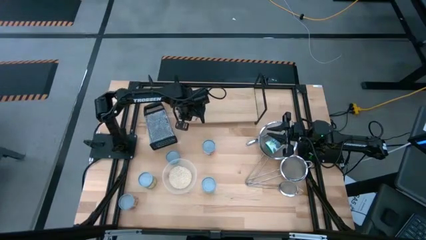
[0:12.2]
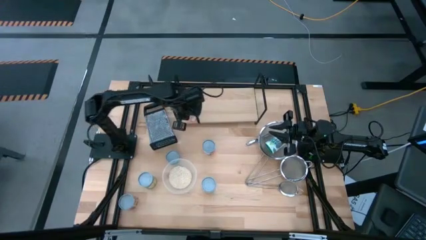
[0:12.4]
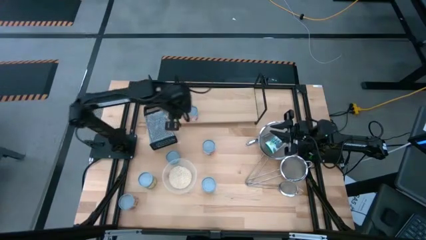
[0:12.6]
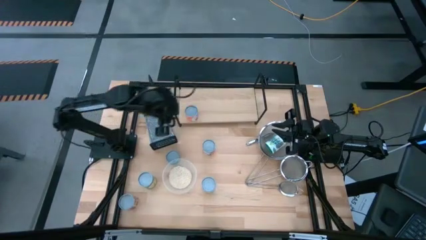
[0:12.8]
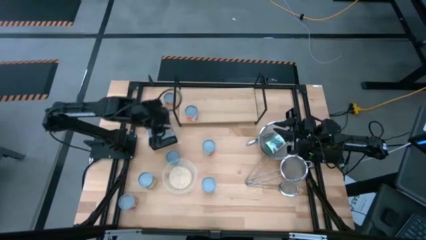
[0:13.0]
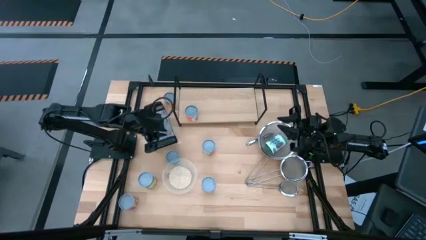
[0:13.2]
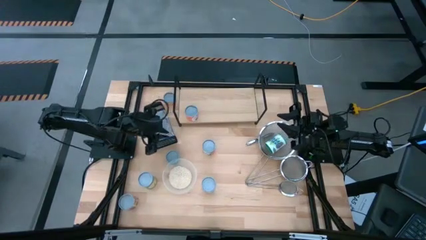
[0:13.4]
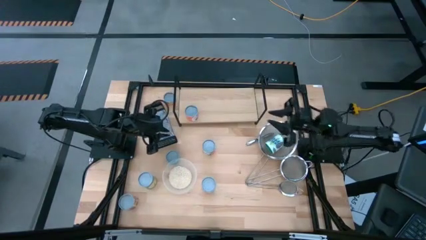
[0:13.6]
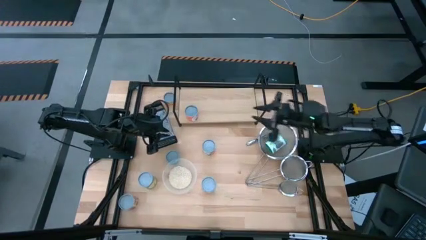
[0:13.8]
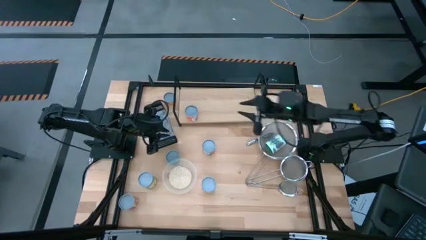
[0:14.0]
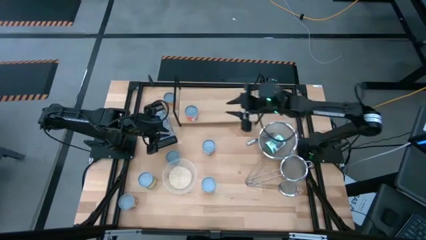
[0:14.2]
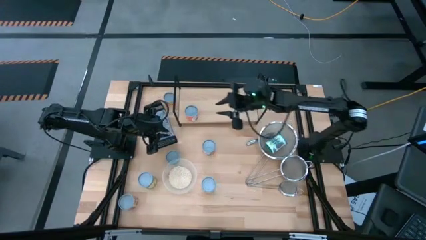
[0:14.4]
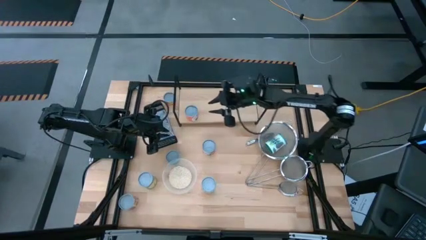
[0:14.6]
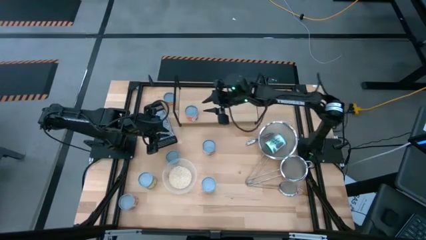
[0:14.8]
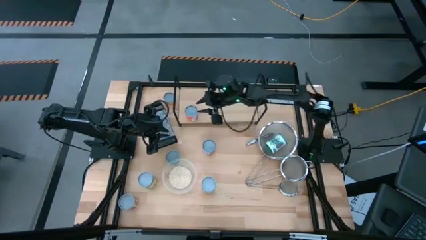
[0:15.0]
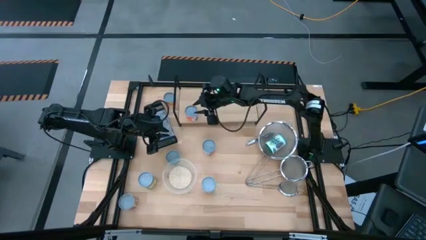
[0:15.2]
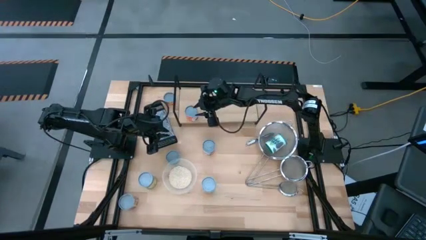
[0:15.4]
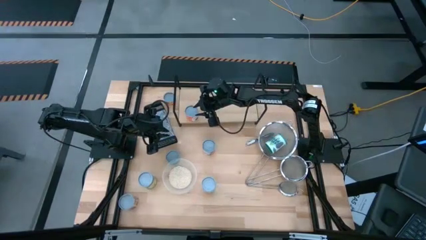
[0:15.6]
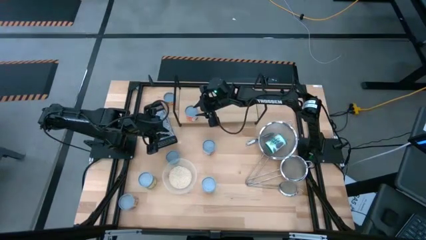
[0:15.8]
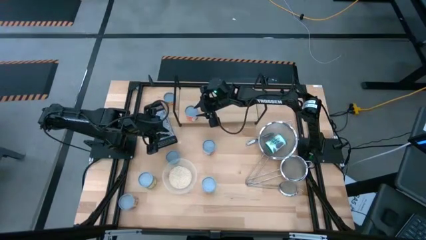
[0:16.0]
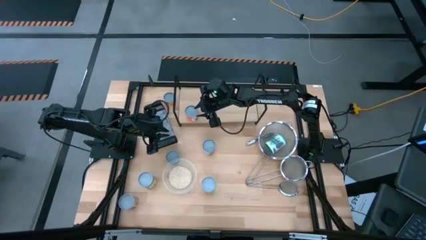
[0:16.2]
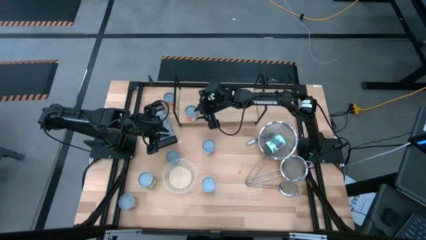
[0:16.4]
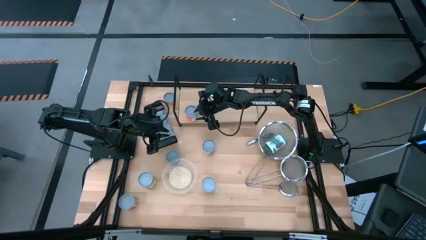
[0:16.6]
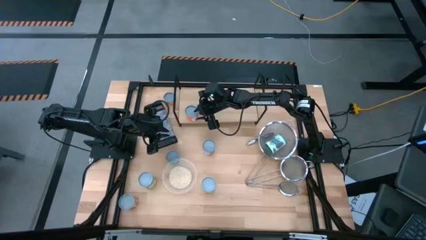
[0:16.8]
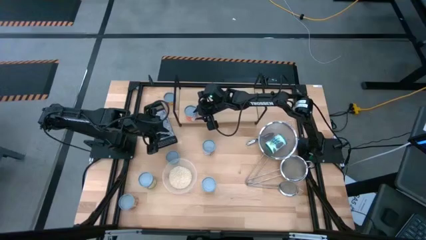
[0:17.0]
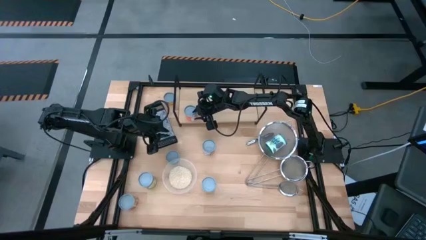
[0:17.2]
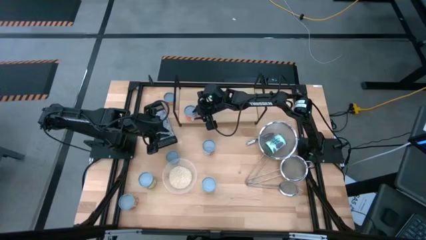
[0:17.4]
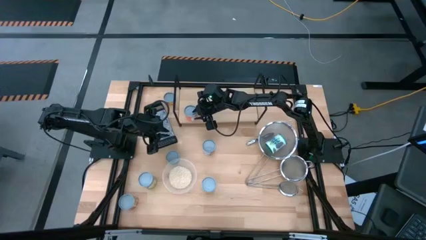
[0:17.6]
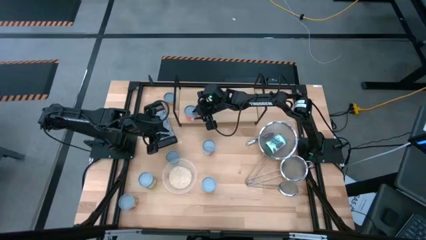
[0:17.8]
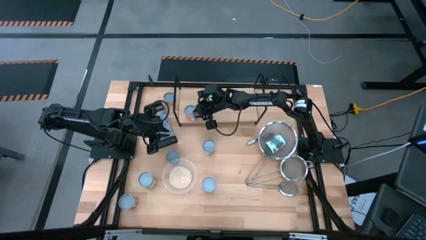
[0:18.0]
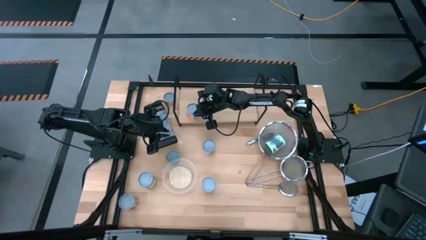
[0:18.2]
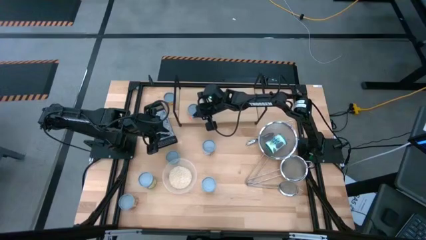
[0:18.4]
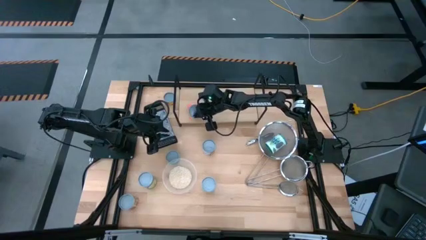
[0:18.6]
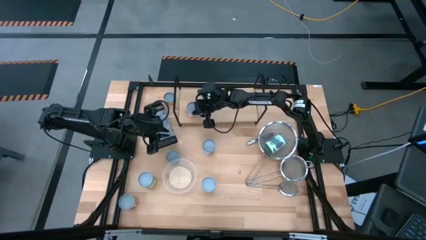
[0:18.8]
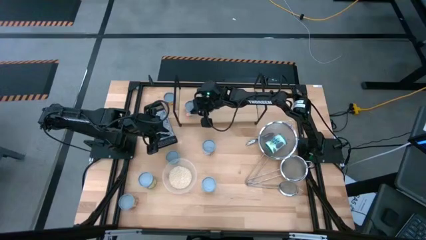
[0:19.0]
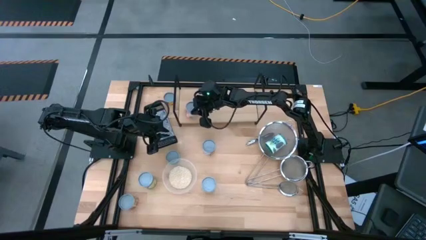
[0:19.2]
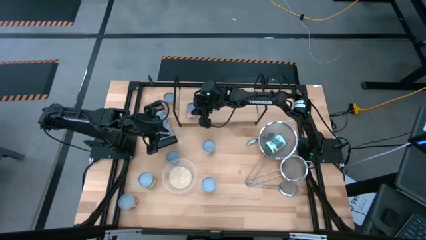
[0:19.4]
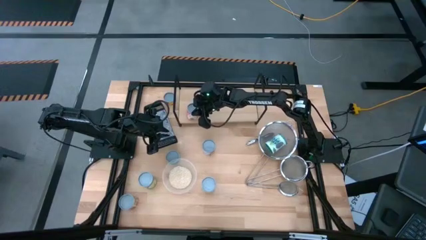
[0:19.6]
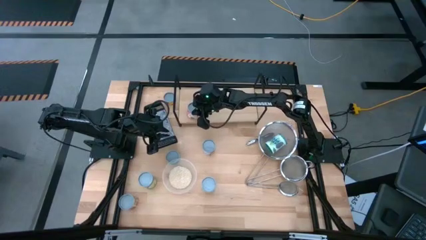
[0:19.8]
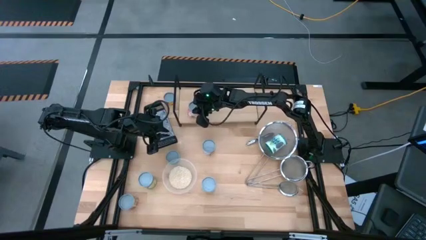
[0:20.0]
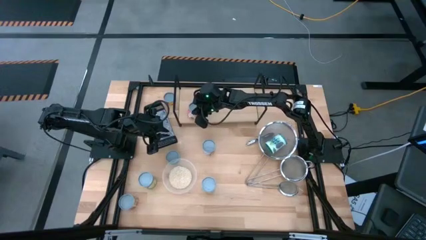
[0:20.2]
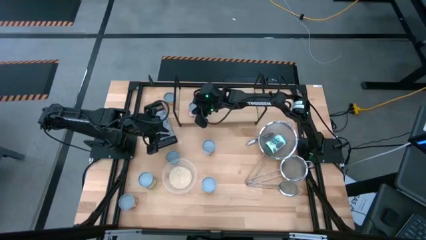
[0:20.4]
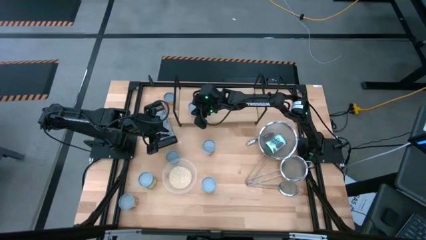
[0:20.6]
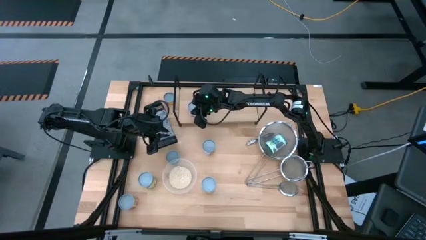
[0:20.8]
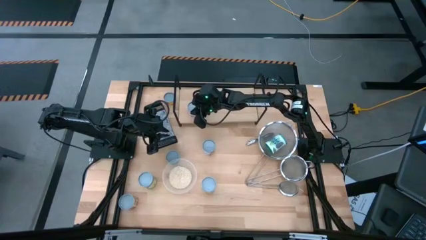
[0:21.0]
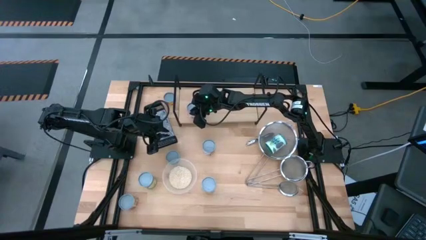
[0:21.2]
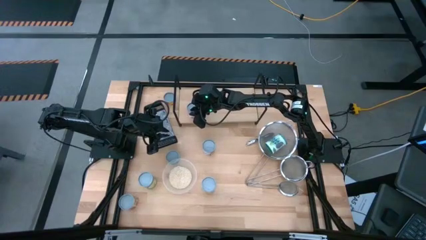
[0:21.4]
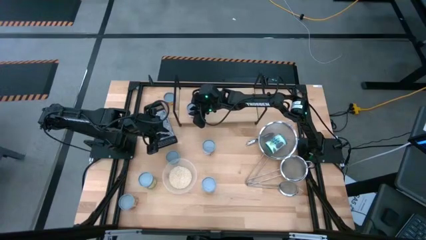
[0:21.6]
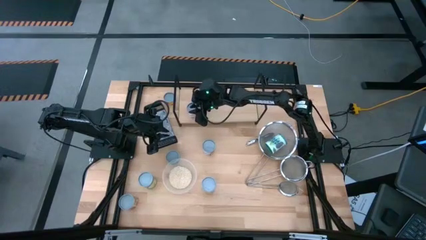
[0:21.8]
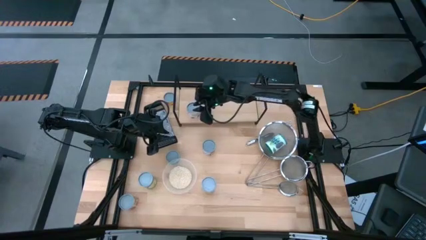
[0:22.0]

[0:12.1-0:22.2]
Task: Pick and place cans onto a shelf
Put the orange spaghetti sauce can on the shelf
